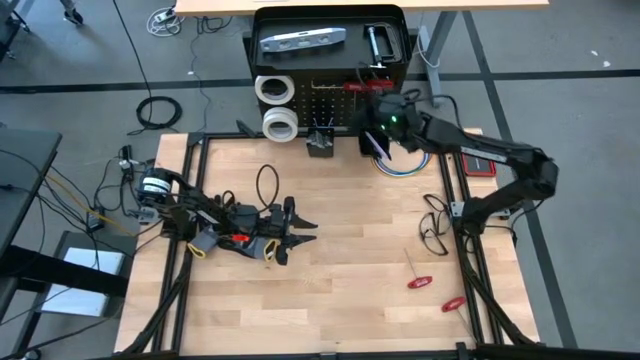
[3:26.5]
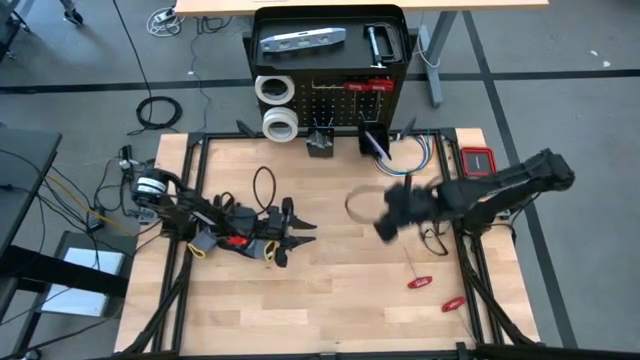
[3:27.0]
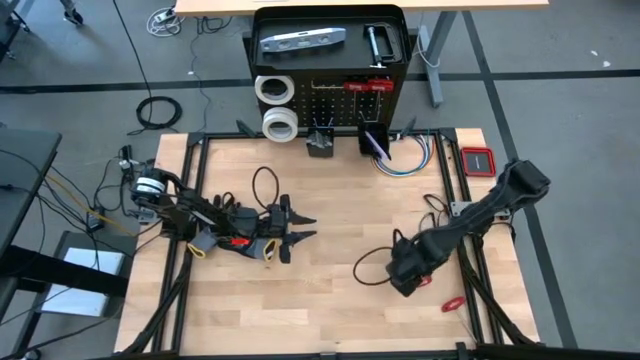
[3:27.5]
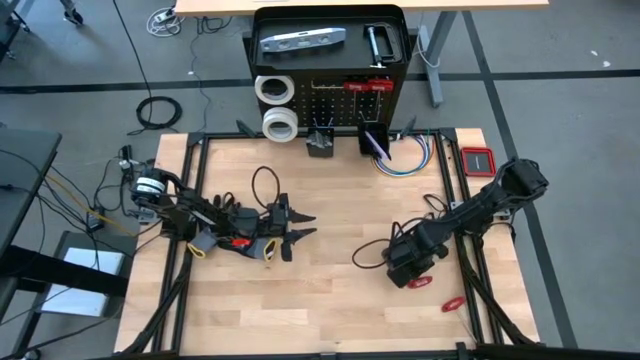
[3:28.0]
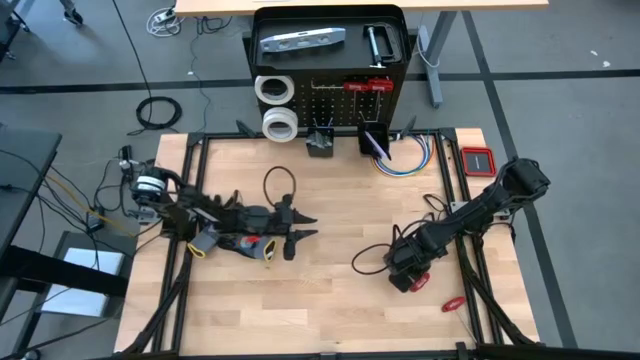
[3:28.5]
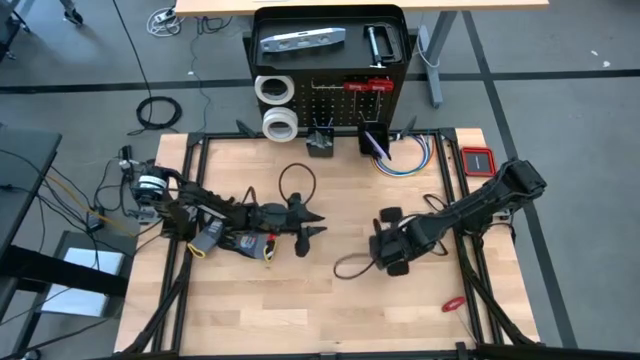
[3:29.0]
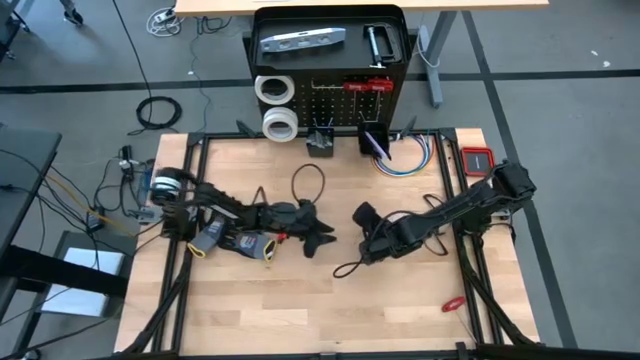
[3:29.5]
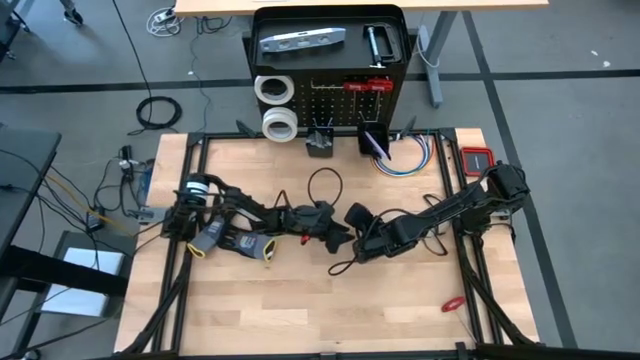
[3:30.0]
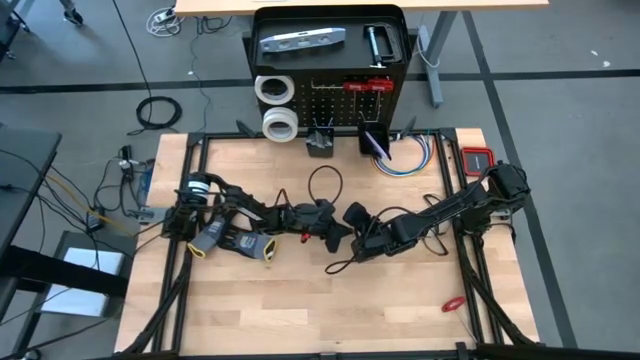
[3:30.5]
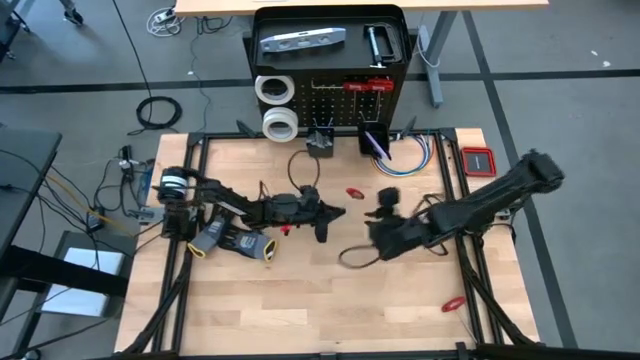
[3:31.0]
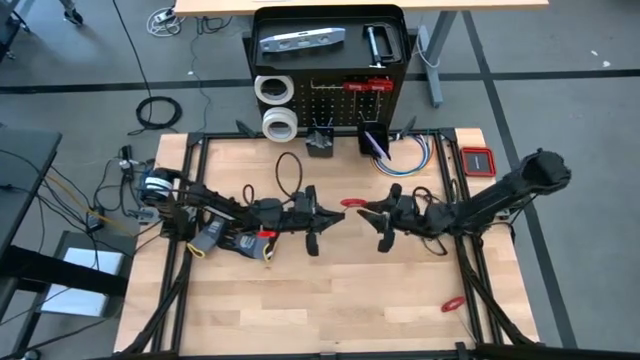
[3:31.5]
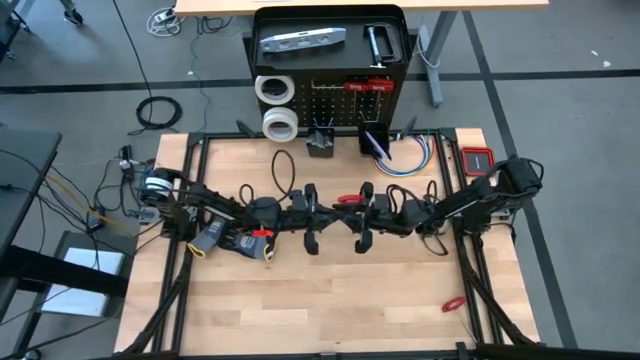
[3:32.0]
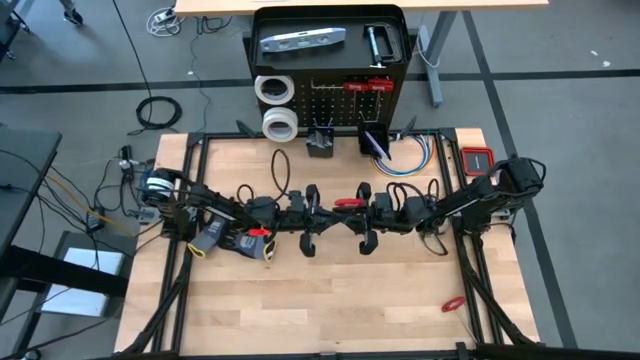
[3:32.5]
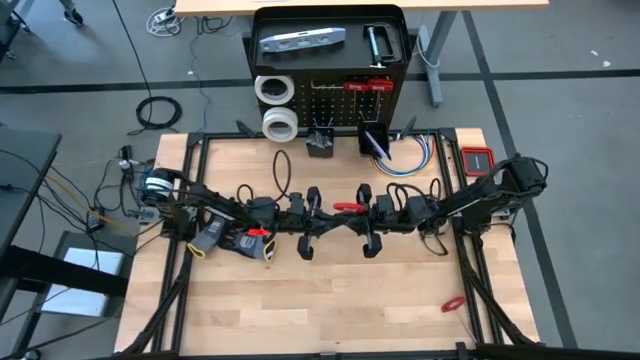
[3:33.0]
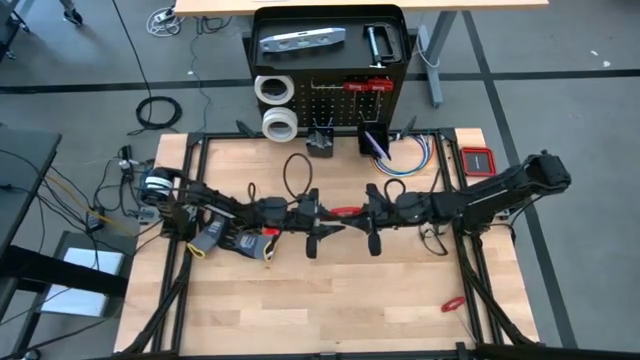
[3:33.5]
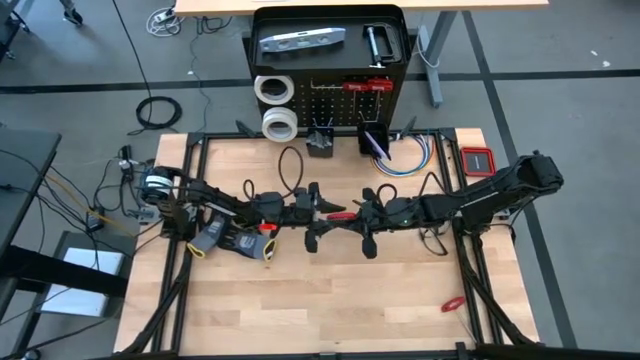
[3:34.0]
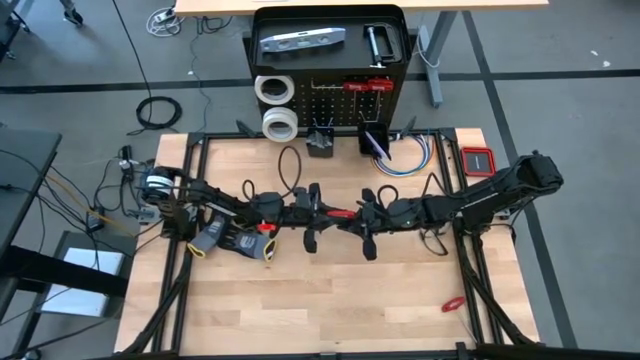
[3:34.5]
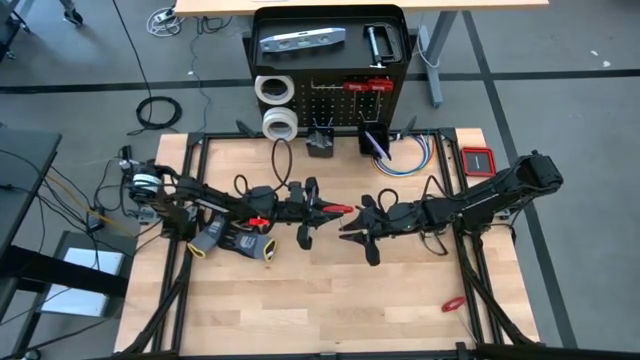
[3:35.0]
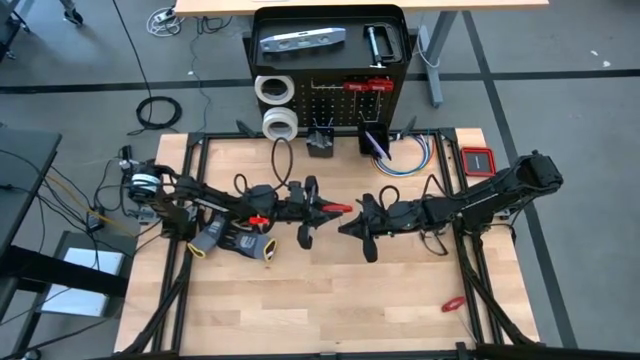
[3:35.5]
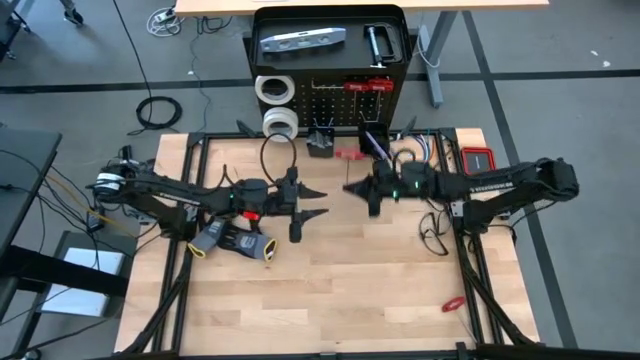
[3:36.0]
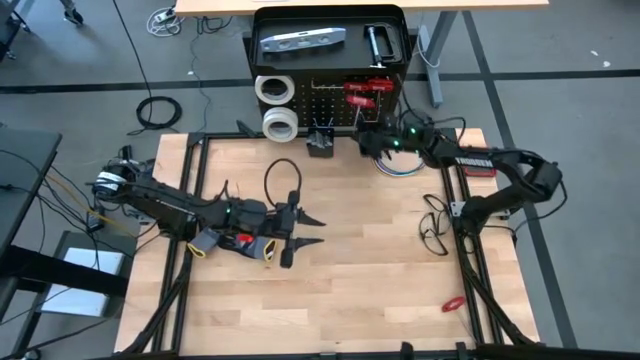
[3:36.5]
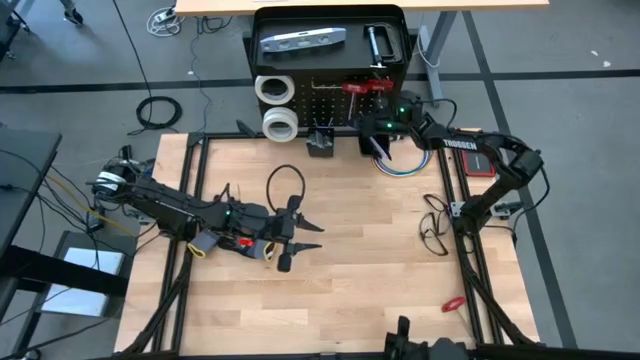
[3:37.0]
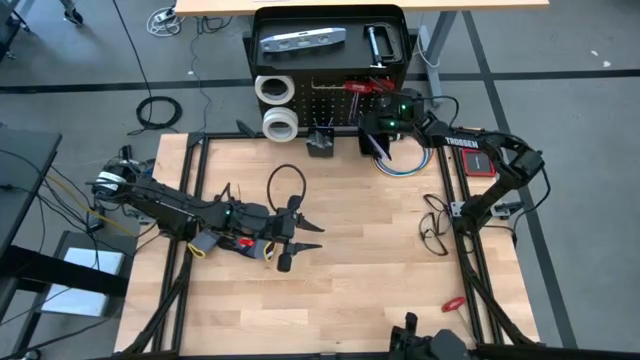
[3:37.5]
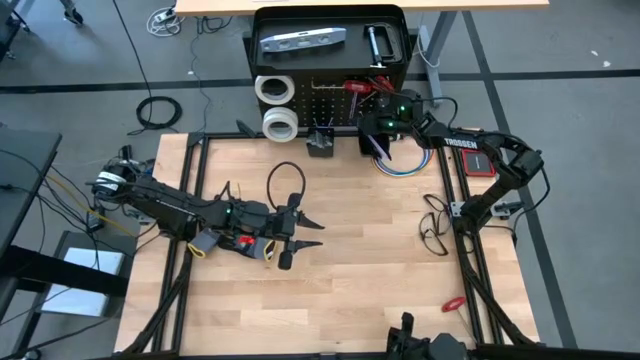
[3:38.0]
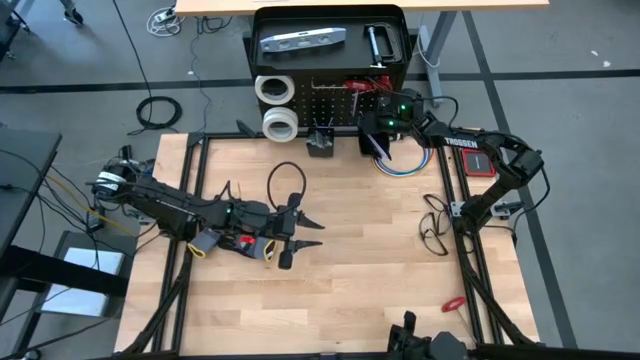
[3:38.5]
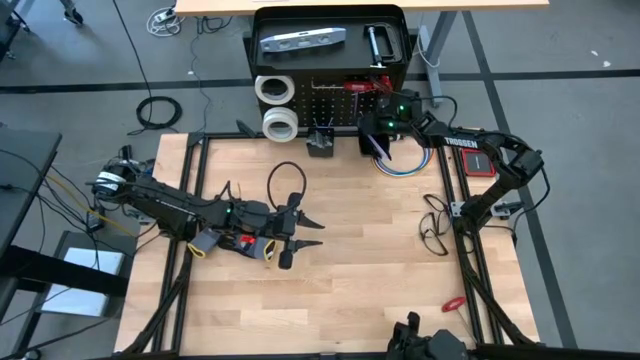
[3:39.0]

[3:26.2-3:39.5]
Task: Hang tools onto peg board
Hang the allen wrench on the peg board

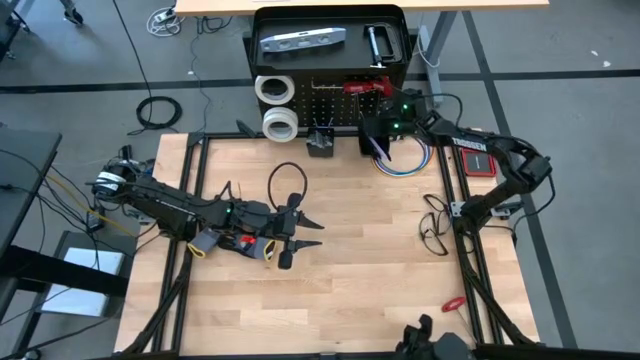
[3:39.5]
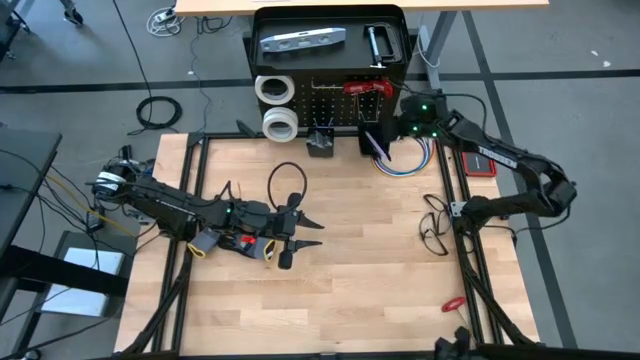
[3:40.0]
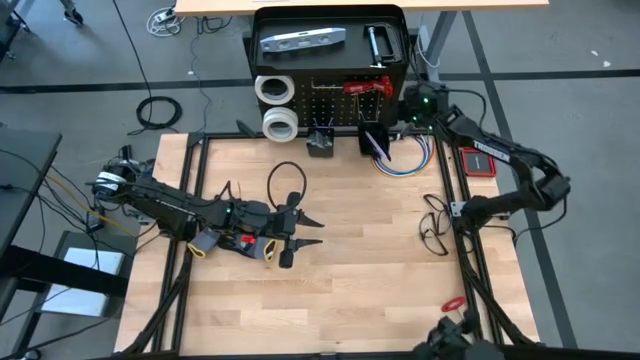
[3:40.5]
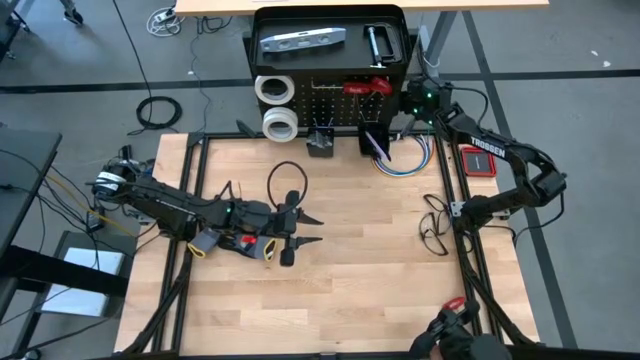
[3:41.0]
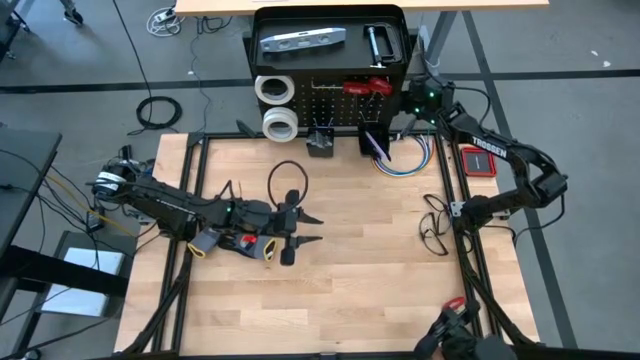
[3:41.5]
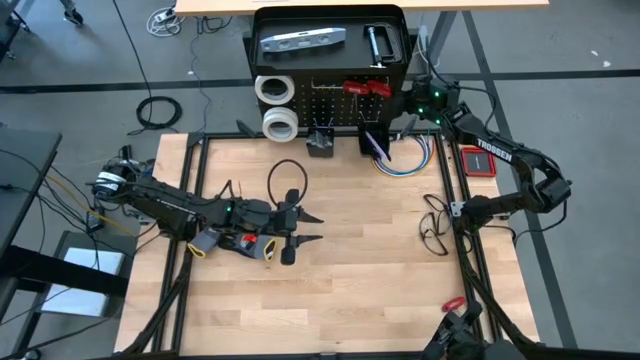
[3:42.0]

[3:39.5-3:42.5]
Adjust the allen wrench on the peg board

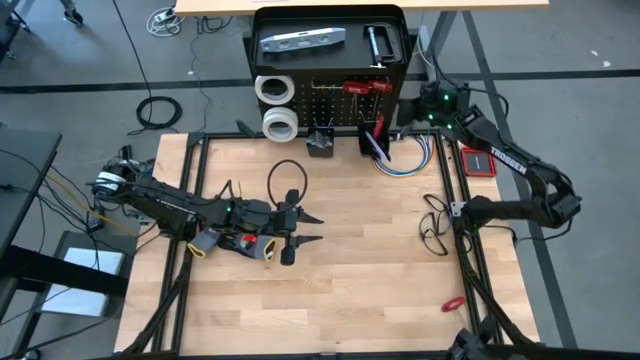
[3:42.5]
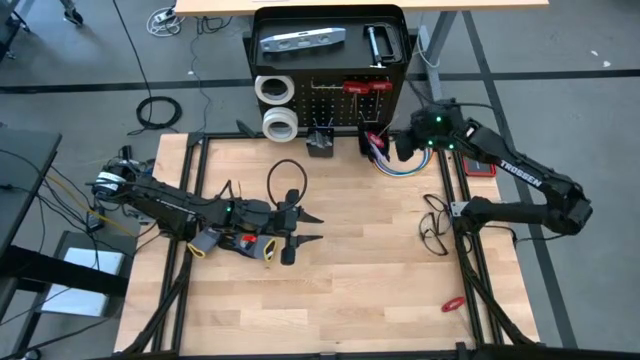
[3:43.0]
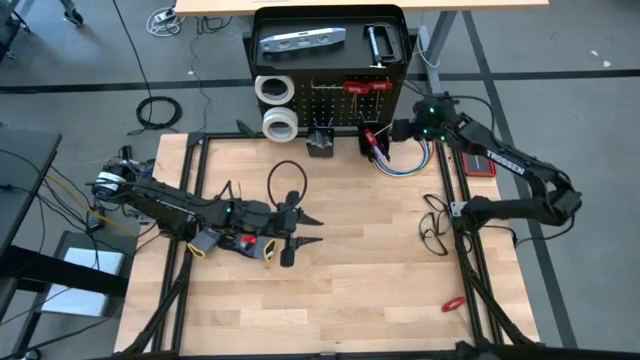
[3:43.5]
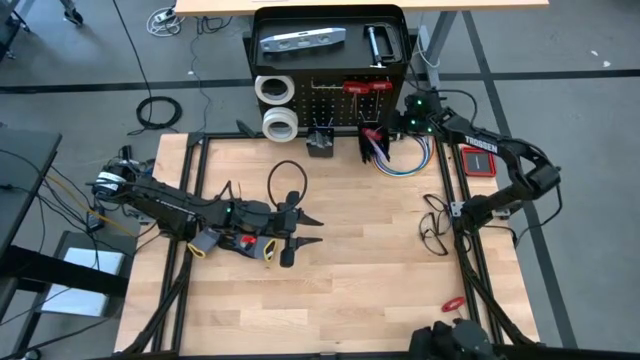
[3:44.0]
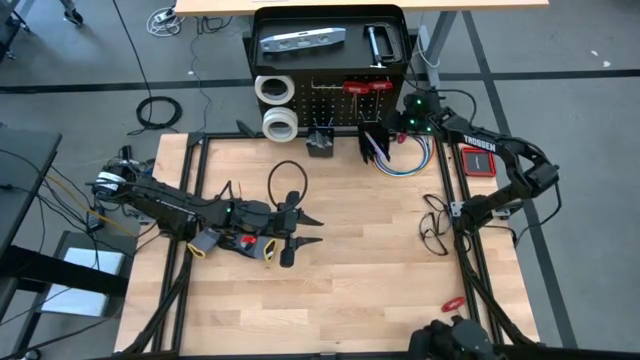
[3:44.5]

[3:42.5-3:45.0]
Hang the allen wrench on the peg board

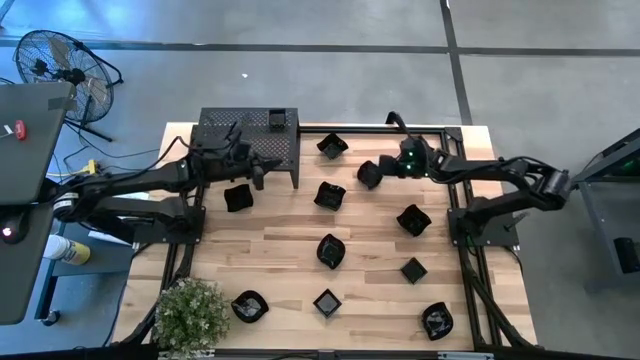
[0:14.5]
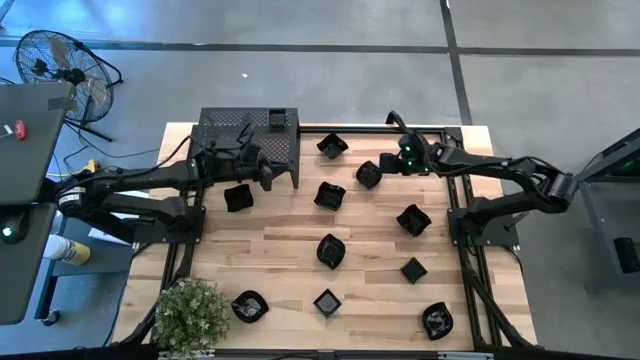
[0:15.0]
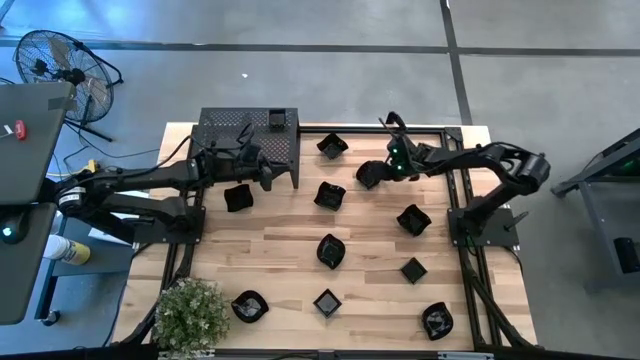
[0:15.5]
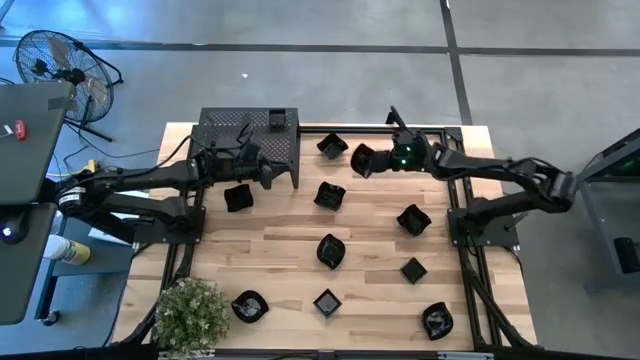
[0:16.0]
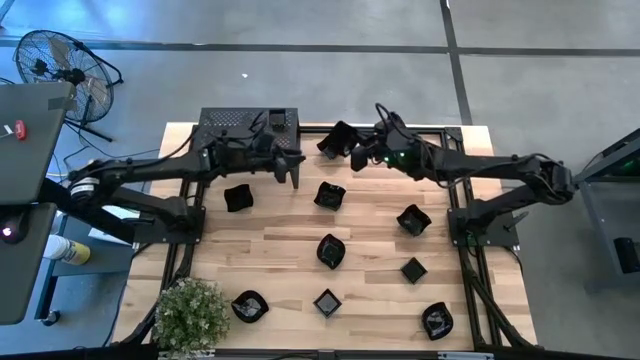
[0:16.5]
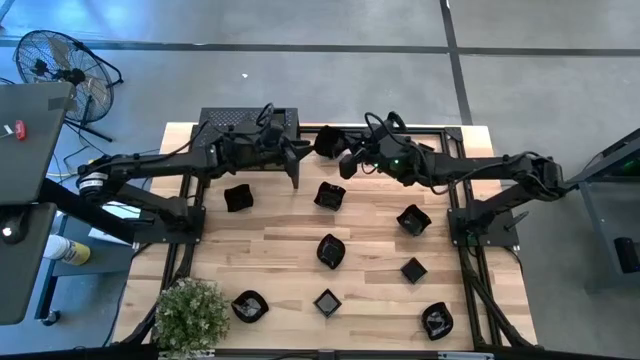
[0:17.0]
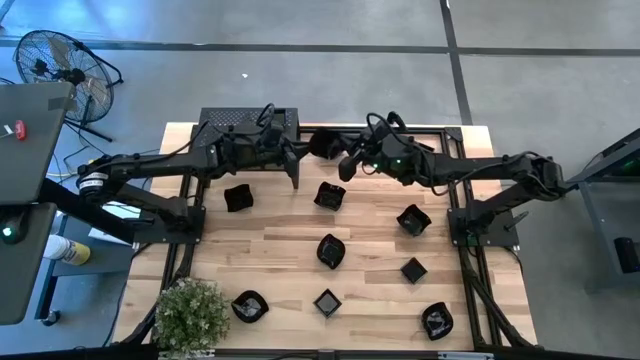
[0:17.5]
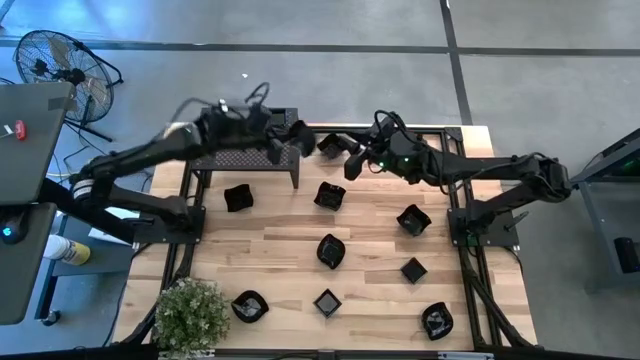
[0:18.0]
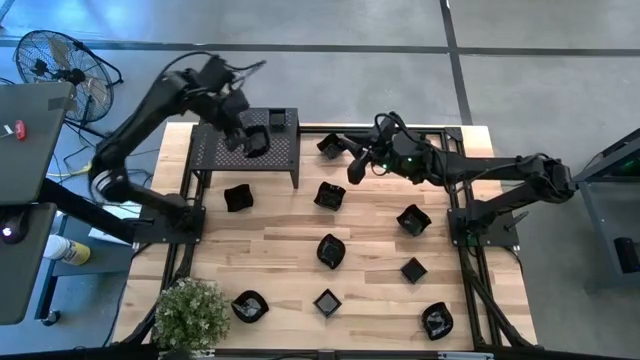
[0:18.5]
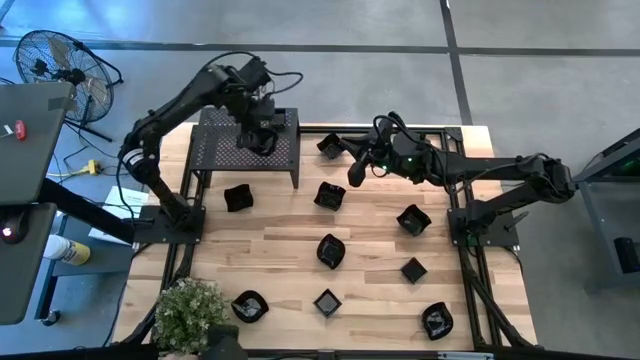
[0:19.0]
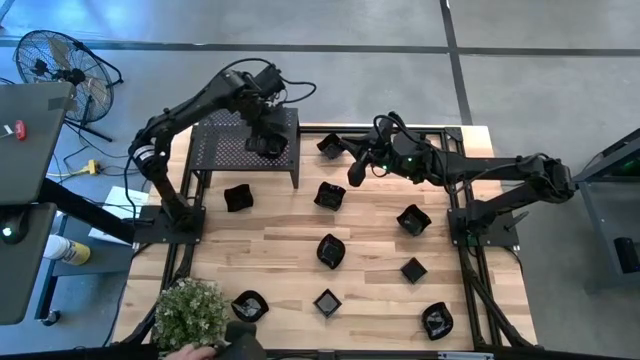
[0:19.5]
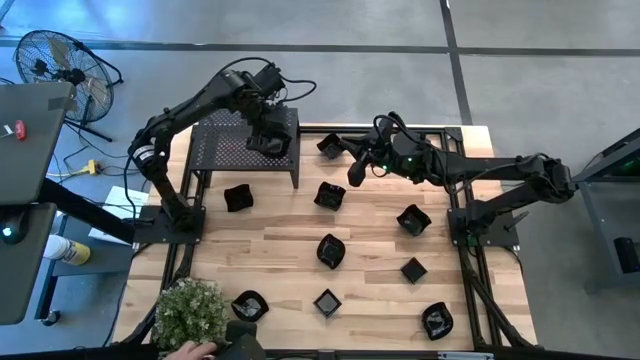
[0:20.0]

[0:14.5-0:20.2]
Task: Pick & Place Mini shaped plates
Put the leaf-shaped plate on the shelf
